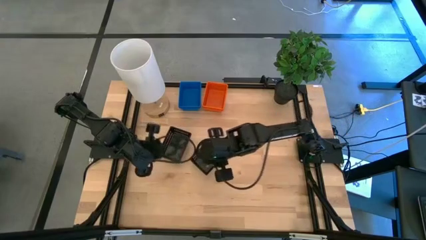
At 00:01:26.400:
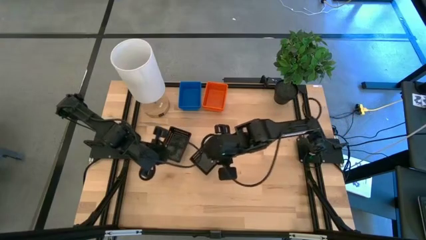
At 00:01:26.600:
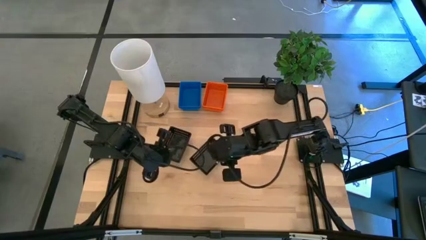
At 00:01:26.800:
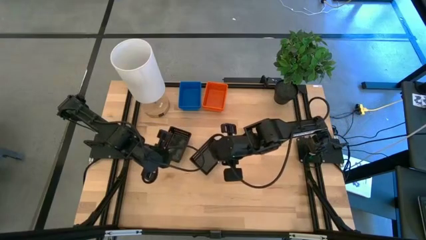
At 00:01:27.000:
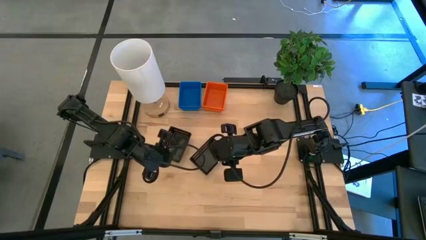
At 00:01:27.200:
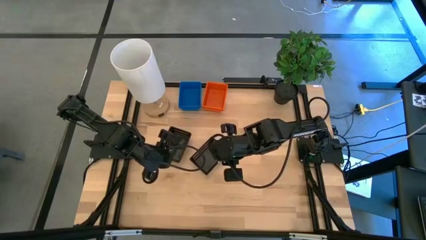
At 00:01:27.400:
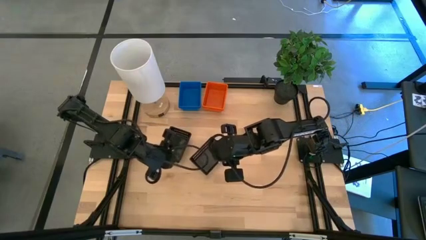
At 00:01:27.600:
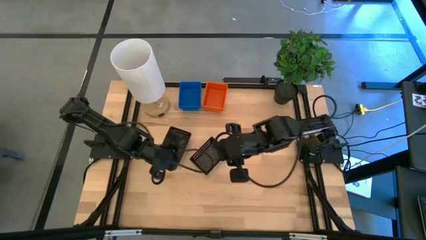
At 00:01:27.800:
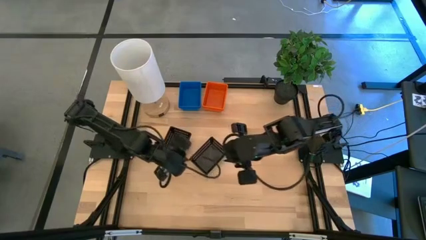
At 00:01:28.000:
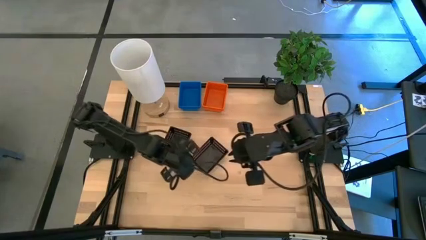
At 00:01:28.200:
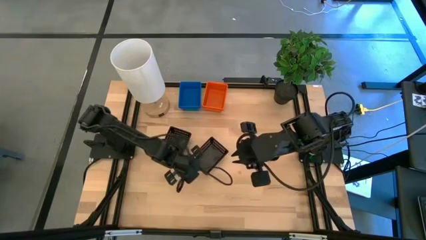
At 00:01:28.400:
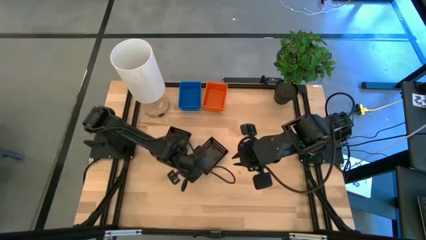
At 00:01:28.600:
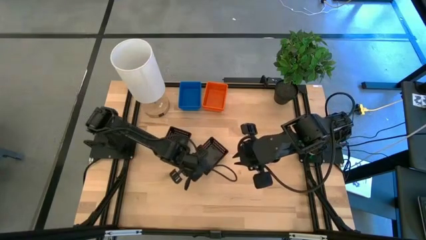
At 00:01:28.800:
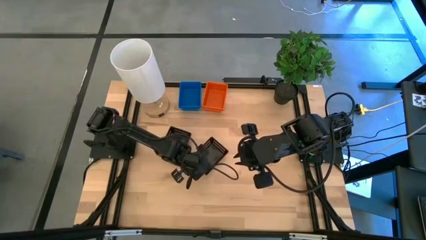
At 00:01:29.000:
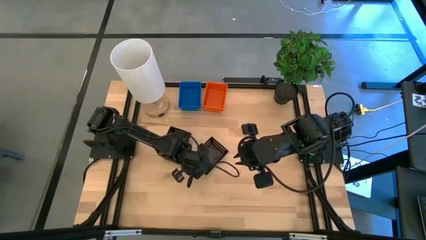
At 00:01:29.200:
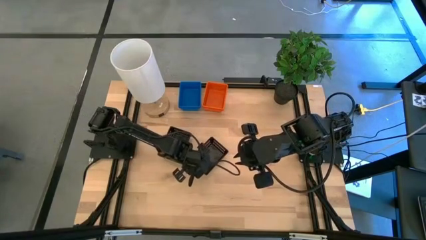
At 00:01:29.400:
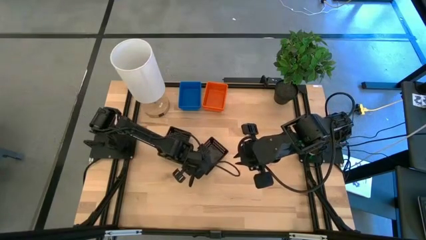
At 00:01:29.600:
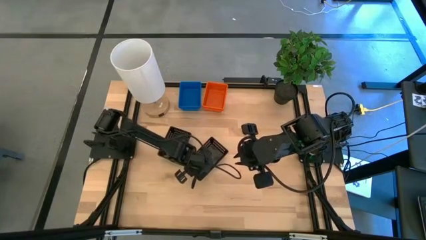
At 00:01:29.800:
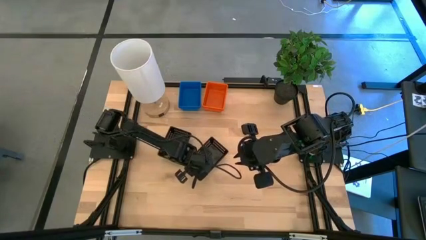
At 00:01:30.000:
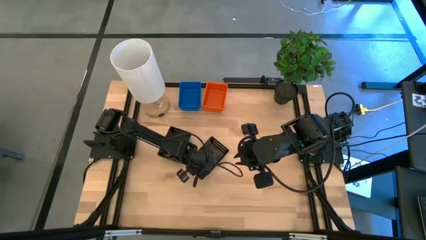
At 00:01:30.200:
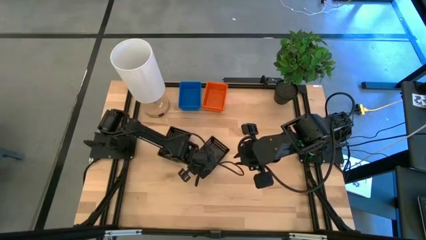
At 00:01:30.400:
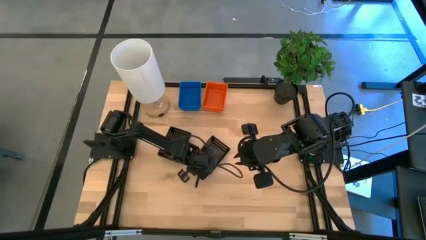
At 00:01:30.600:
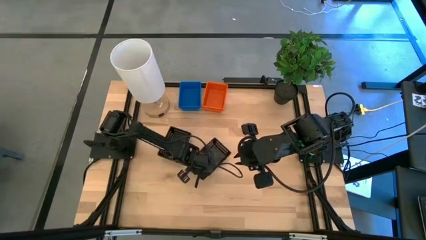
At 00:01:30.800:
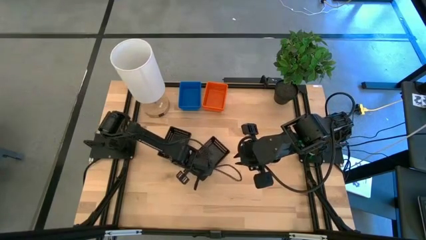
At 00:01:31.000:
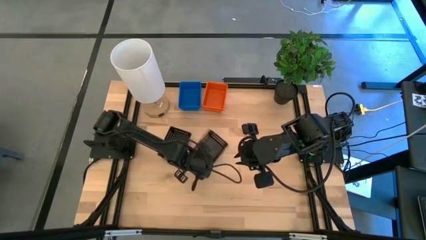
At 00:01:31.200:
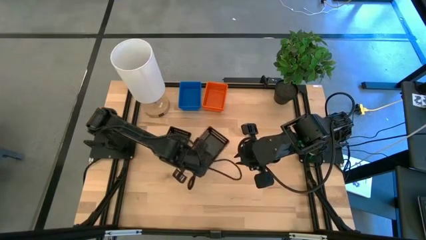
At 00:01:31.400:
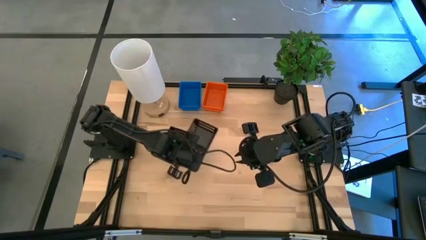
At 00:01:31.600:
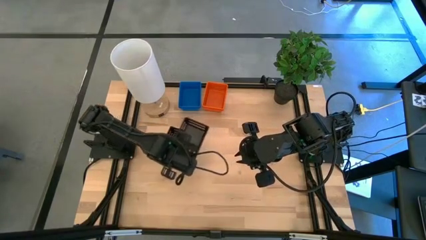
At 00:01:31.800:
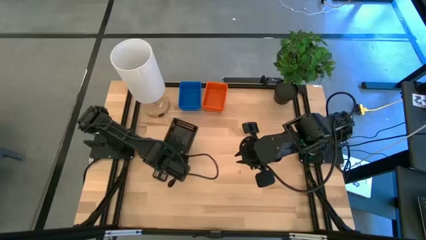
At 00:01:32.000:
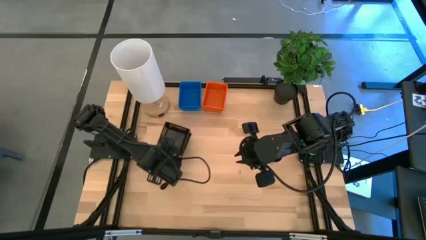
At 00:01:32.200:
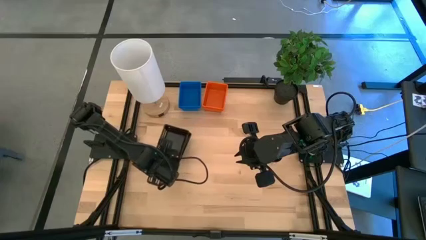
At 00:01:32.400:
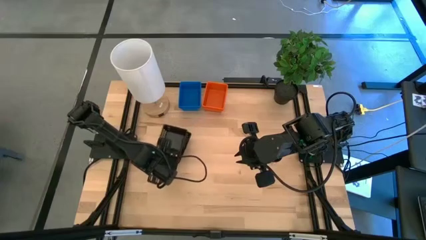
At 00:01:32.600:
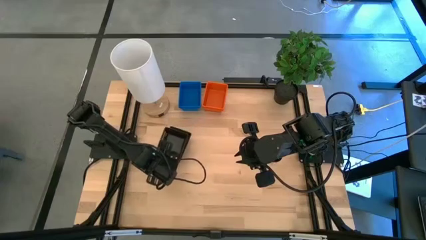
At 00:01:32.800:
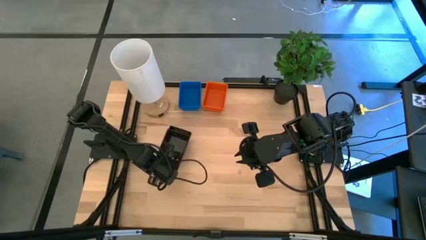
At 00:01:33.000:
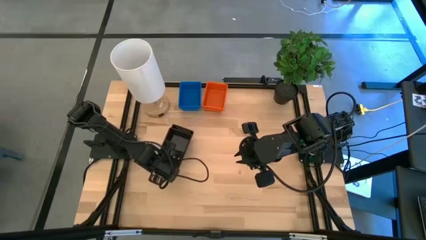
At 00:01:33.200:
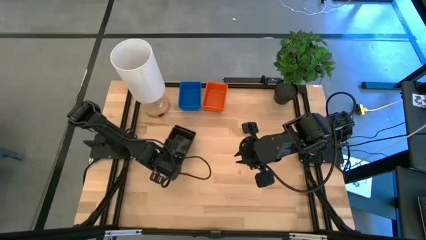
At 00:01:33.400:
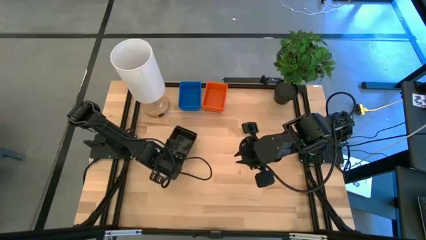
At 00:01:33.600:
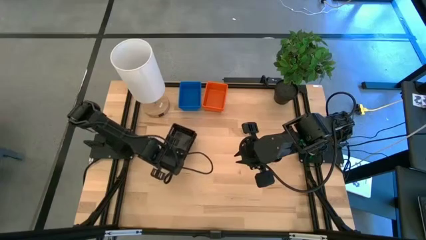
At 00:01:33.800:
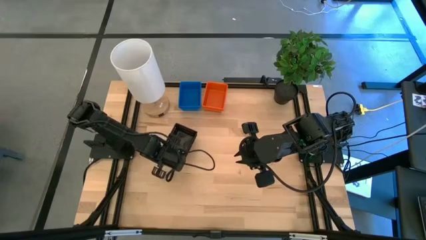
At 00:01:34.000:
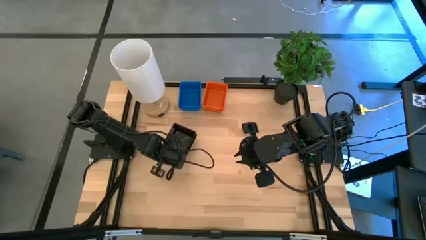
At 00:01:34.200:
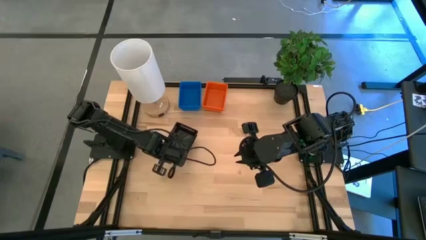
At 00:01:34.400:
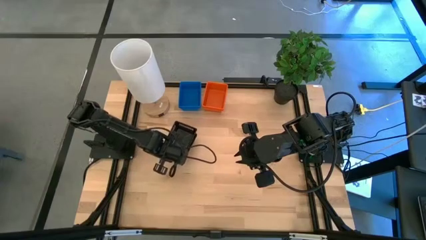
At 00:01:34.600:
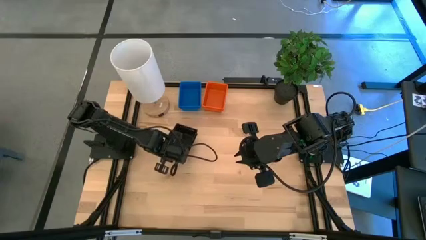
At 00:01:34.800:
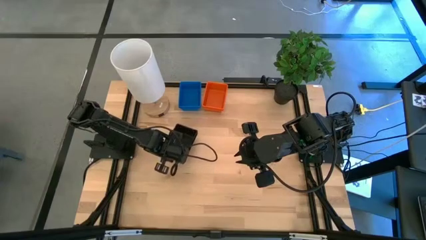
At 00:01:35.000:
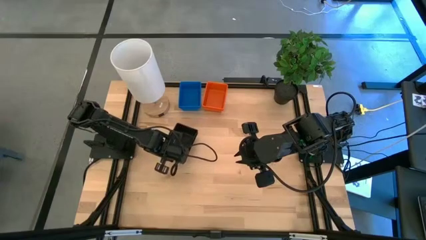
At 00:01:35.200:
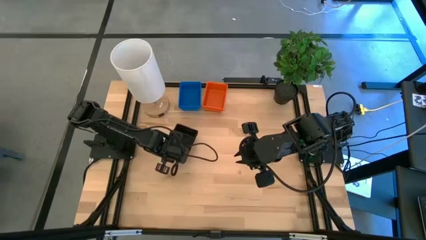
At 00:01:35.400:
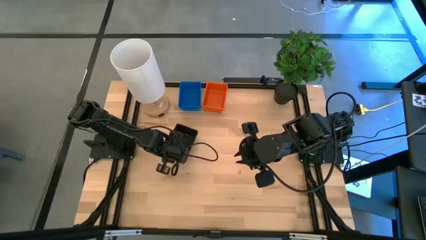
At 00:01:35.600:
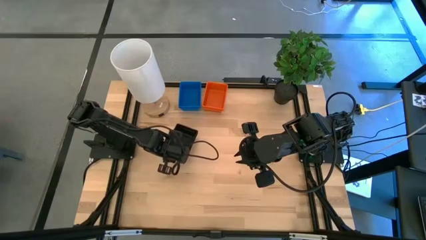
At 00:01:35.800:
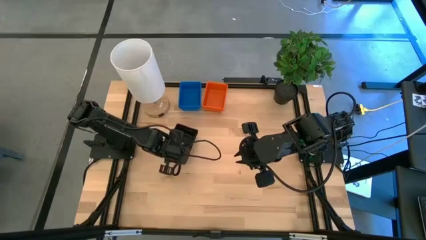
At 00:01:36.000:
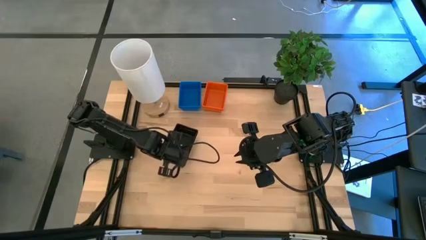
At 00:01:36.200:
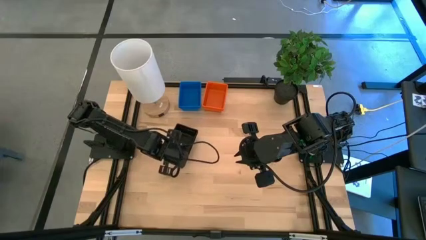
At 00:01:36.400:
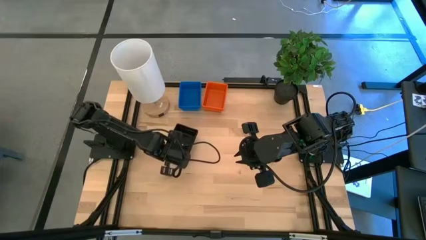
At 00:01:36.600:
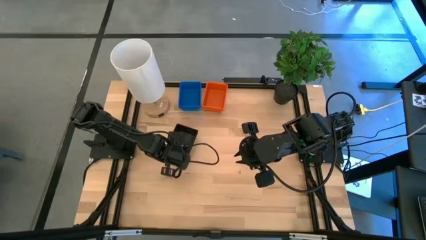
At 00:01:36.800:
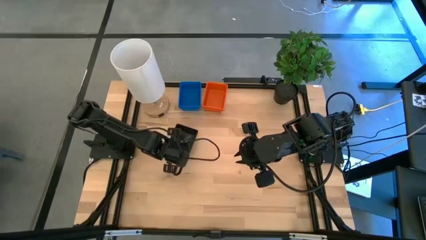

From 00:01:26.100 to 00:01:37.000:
Stack the black basket on top of the black basket on the table

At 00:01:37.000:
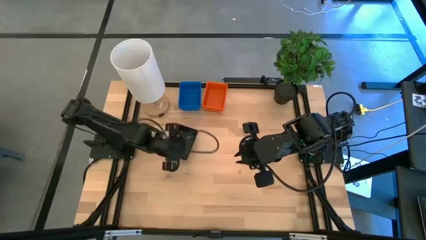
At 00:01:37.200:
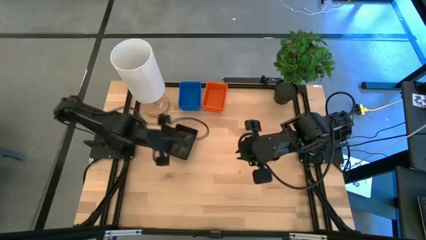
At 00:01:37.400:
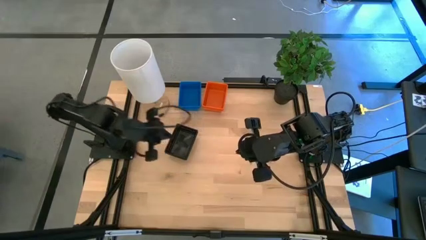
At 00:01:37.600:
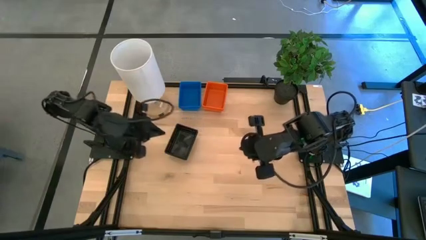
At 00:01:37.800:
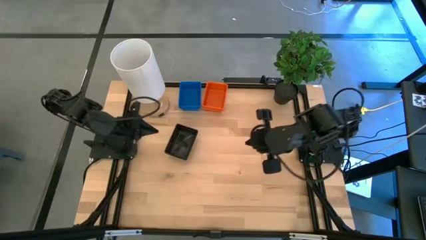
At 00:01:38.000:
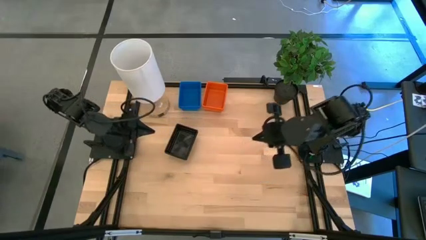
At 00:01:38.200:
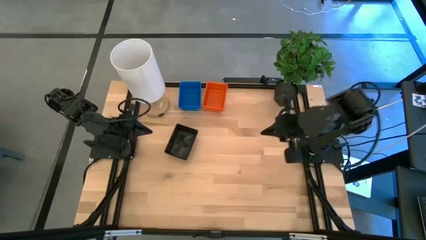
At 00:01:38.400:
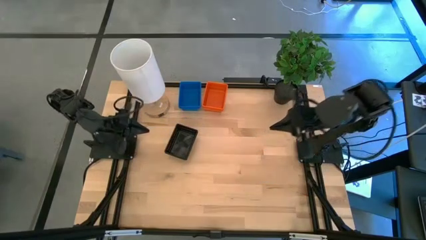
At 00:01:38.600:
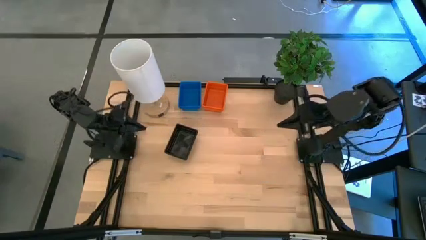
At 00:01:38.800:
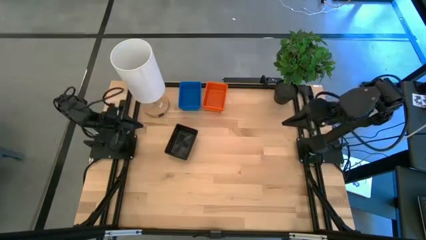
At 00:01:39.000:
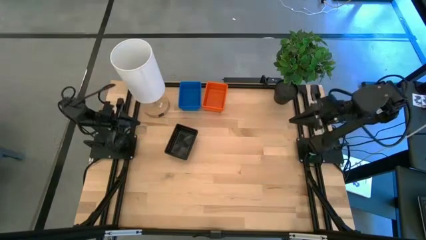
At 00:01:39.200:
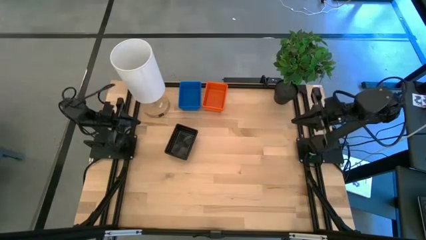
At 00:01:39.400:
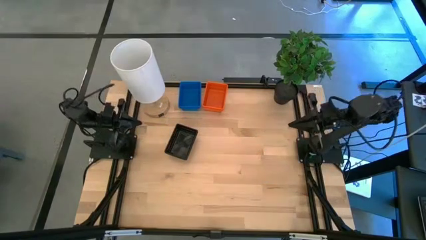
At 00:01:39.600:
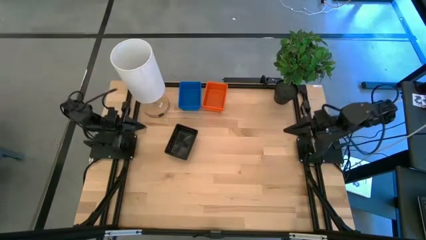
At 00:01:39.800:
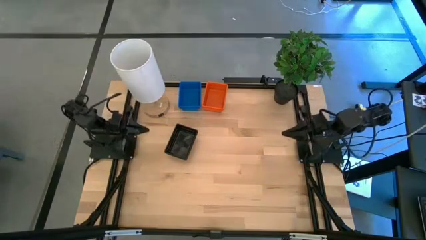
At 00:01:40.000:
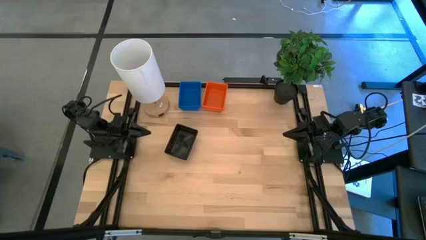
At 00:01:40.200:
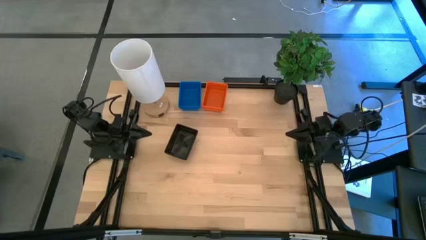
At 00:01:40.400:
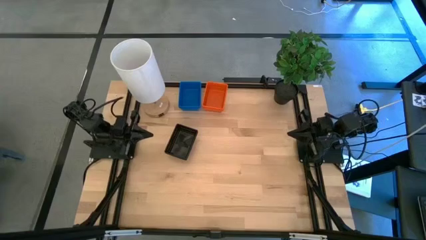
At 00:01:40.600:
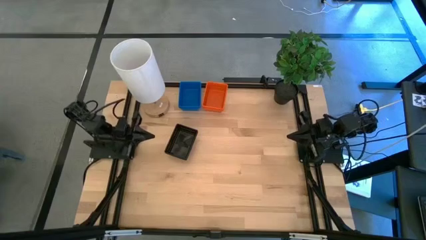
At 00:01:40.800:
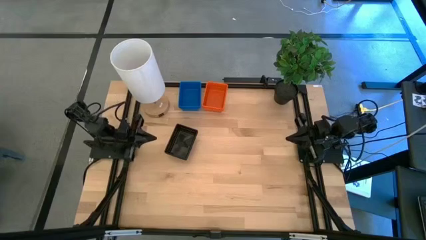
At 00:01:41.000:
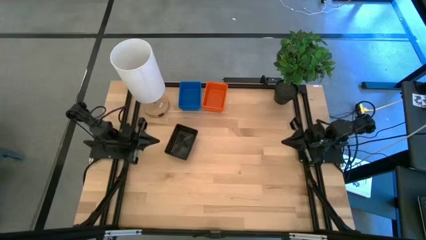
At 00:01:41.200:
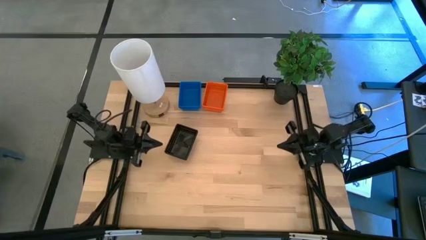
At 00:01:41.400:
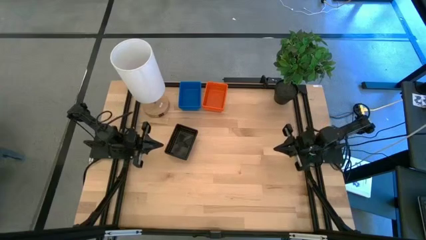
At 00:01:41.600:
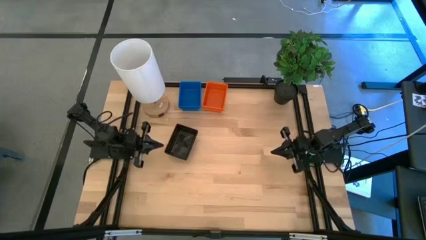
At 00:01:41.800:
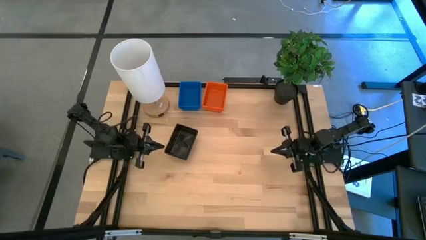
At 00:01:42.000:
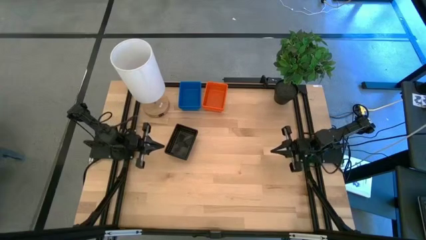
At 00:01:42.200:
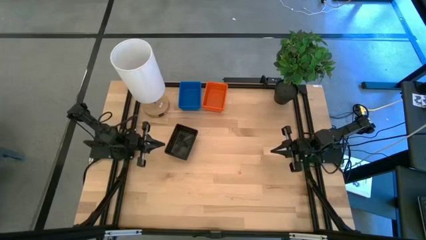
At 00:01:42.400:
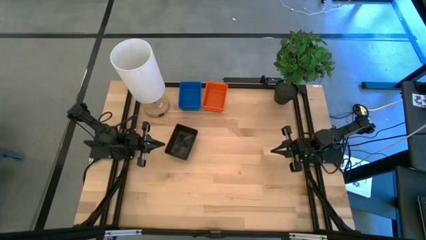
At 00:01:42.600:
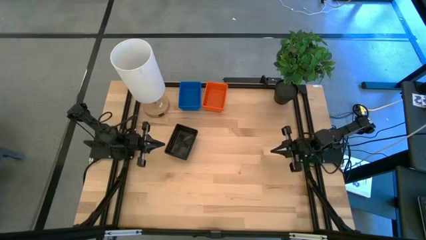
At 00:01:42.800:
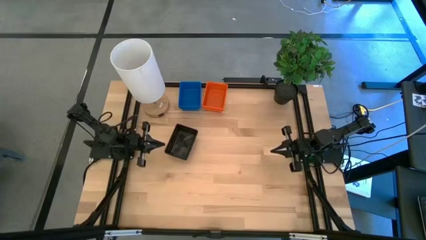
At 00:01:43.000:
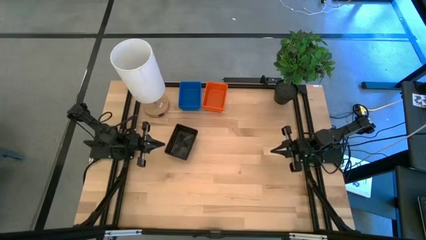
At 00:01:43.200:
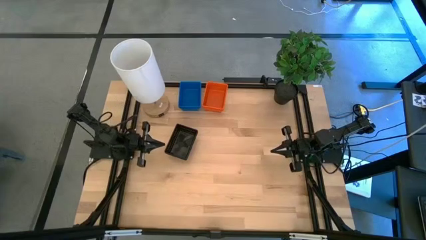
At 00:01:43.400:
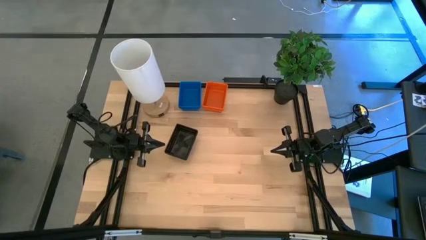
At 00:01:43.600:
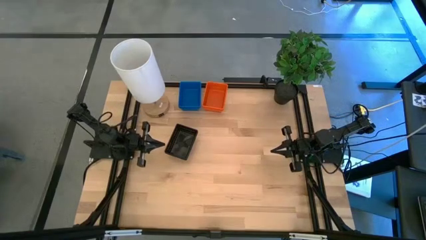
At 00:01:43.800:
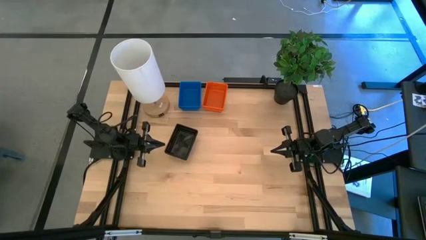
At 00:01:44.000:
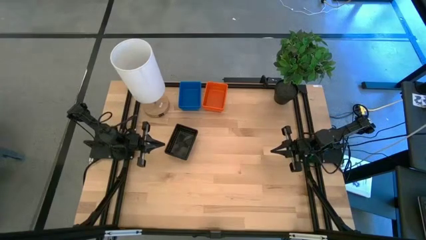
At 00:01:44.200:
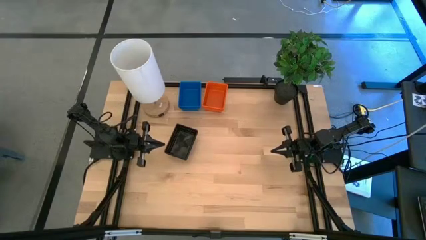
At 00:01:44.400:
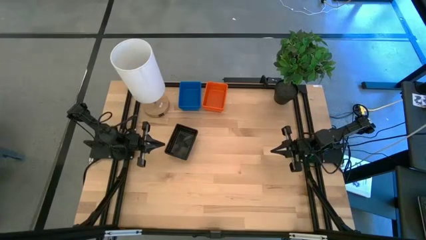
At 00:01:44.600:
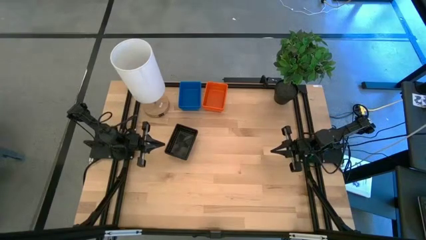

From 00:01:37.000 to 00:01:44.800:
Return to Home Position
